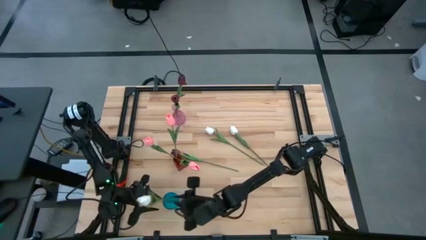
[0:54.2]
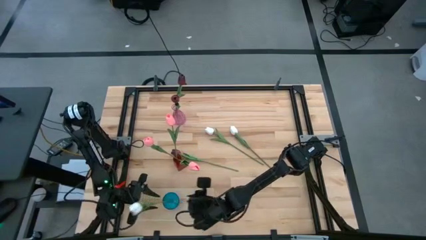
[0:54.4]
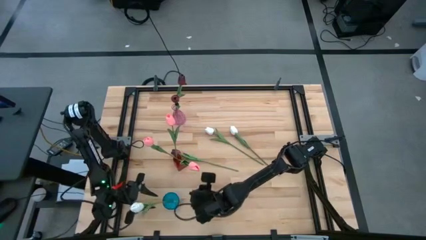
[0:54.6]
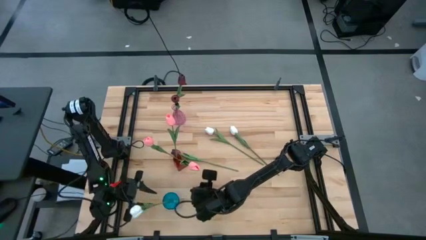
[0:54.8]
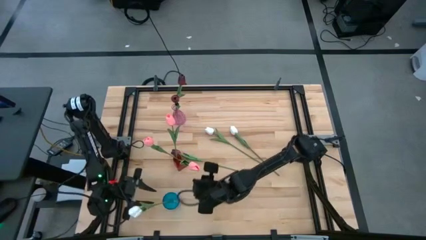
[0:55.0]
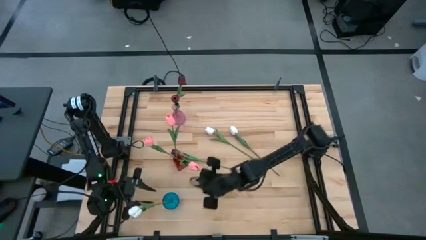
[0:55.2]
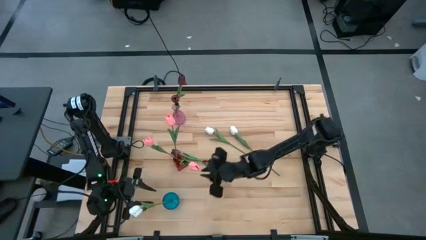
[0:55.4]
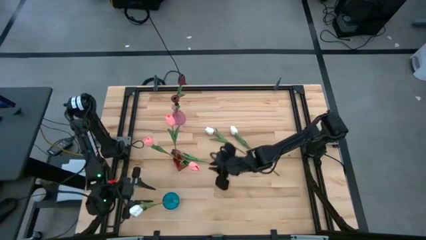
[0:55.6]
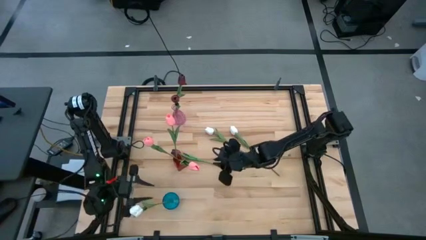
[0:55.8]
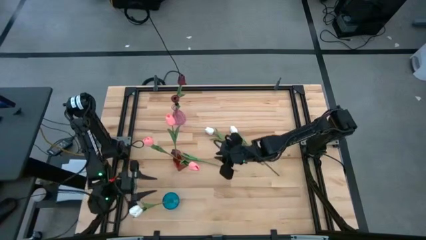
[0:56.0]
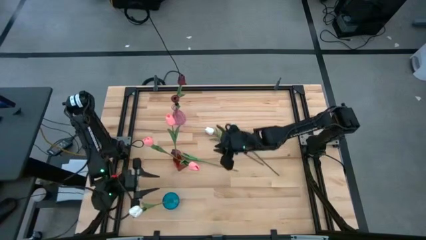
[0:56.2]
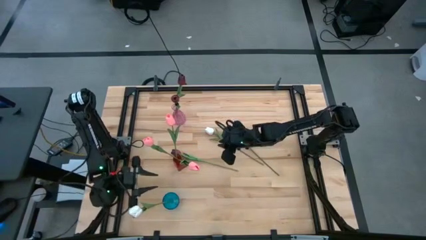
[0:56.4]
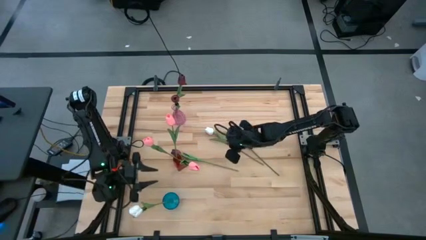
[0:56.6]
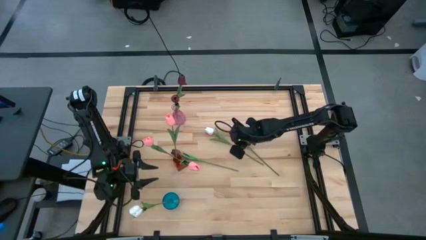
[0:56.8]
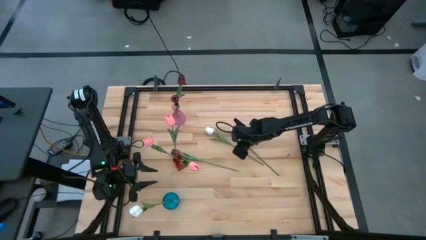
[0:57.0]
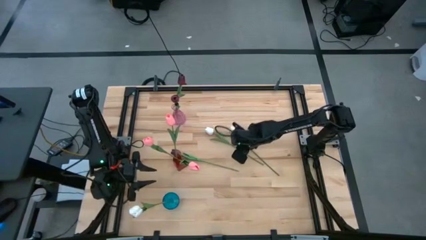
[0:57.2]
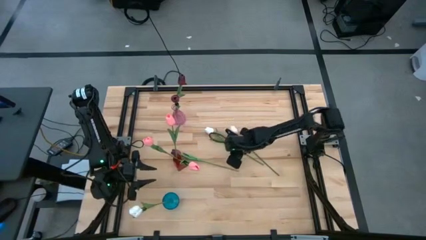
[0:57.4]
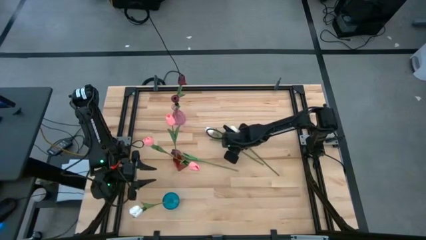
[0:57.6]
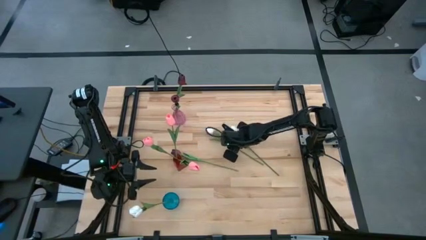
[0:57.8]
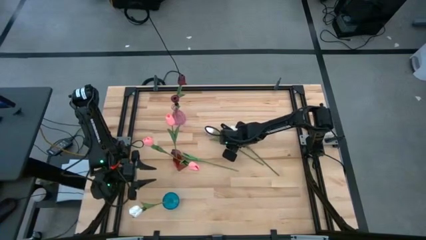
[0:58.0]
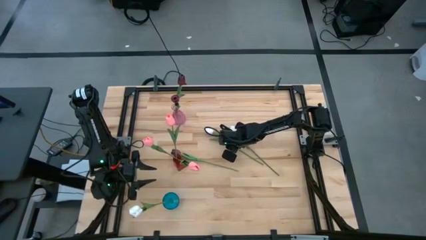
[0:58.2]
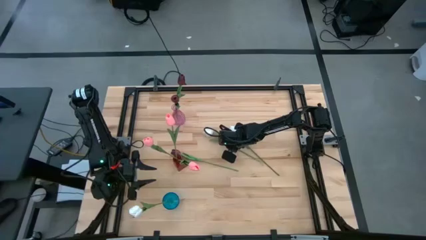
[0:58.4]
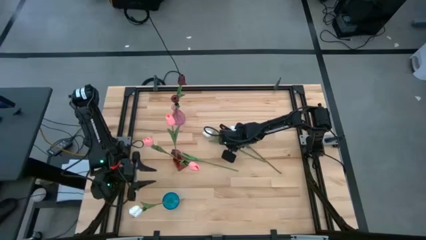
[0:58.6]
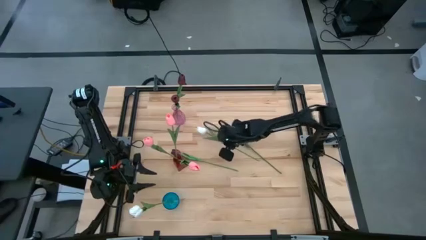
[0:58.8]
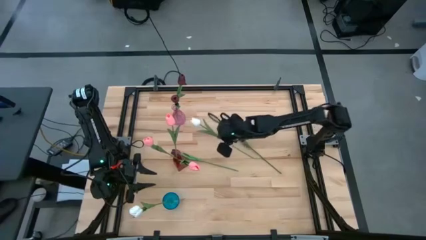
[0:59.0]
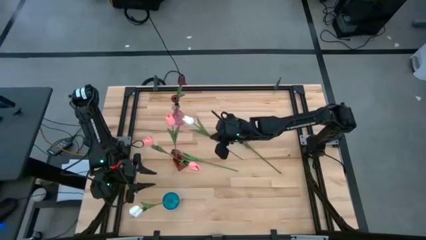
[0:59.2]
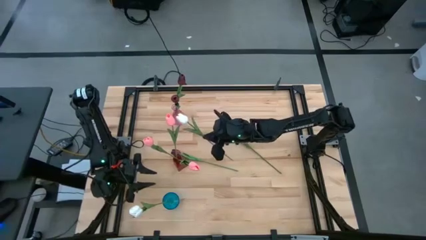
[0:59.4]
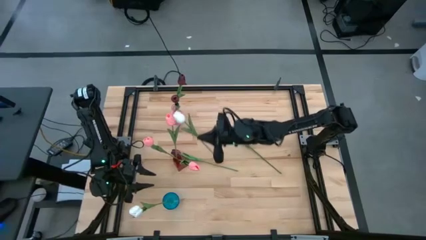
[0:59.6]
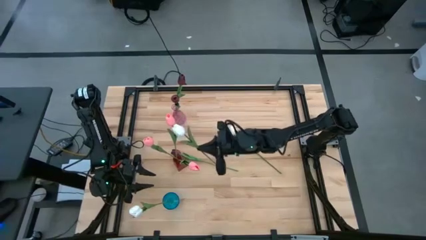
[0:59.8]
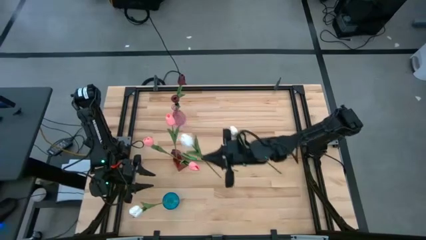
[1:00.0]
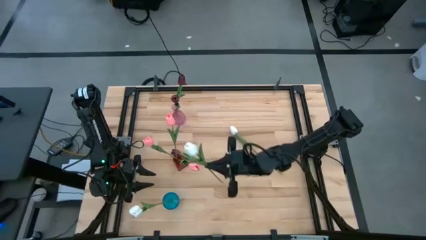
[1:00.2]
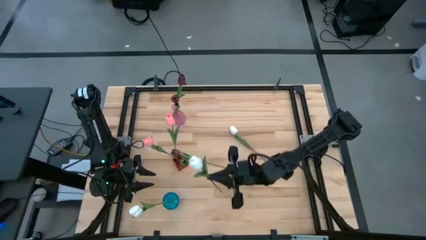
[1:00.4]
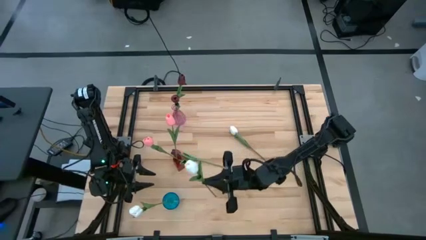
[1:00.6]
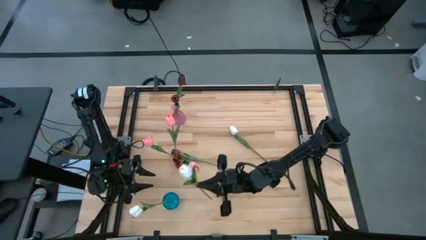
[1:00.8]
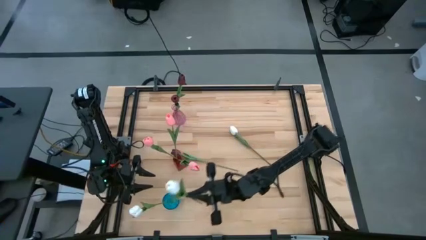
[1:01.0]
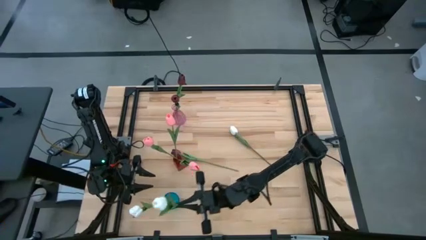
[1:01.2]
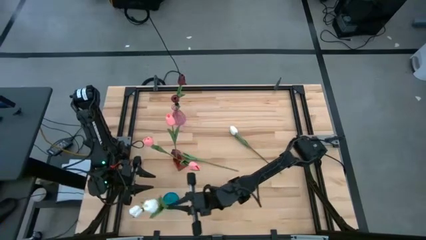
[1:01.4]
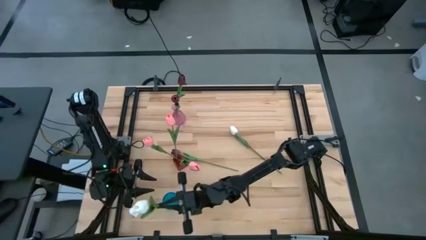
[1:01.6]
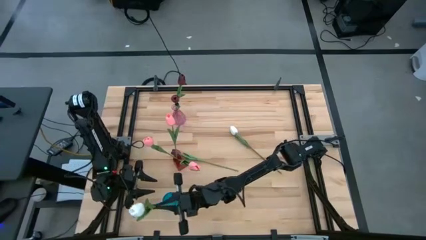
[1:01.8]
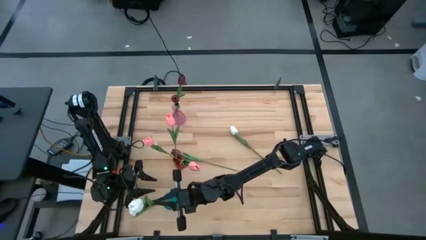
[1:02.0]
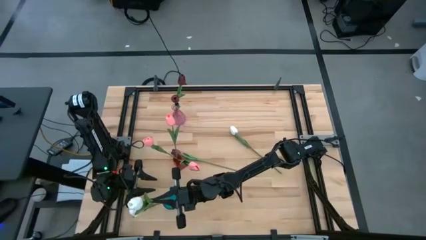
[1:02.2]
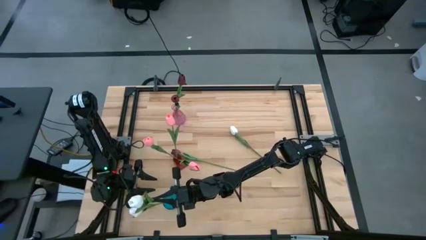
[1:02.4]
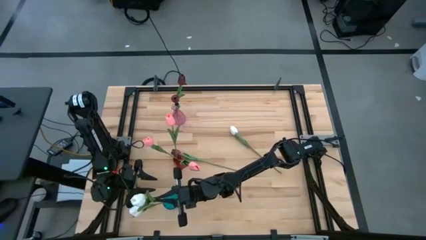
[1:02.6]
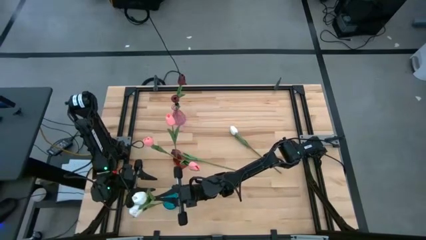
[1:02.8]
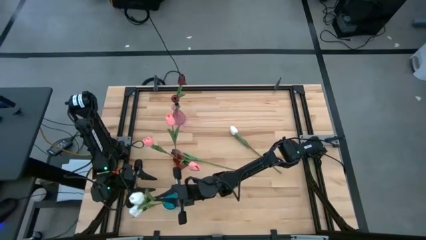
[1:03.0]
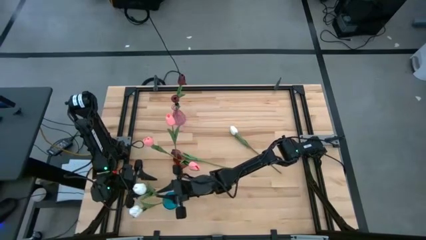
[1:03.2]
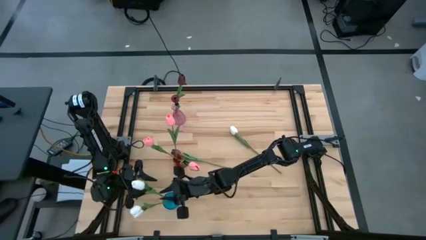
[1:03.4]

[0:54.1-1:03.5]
Task: Sort flowers into vase by color
Put the left white flower into the blue vase

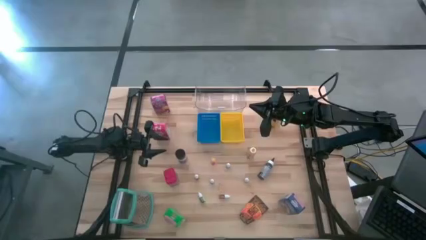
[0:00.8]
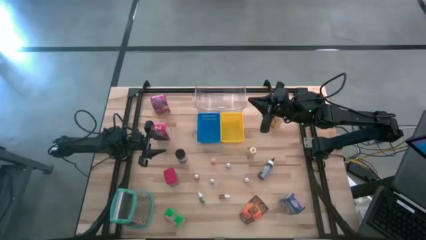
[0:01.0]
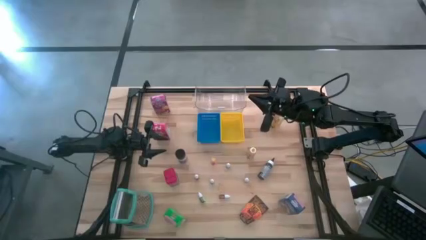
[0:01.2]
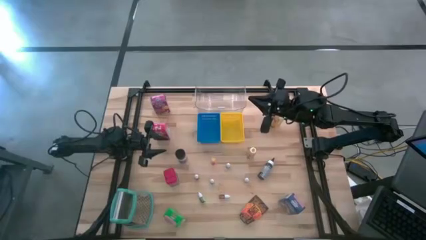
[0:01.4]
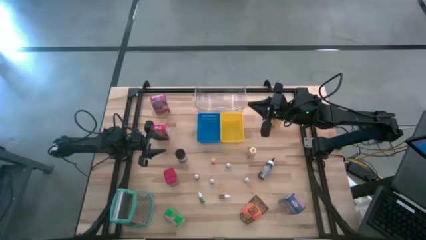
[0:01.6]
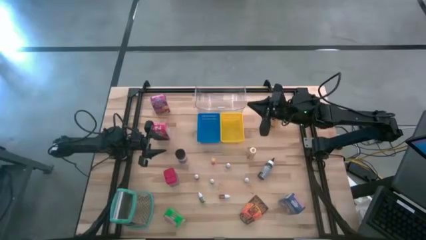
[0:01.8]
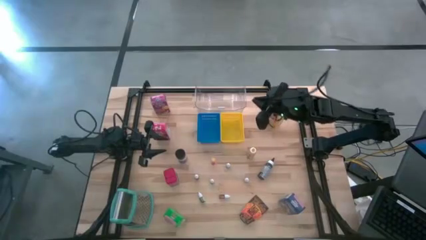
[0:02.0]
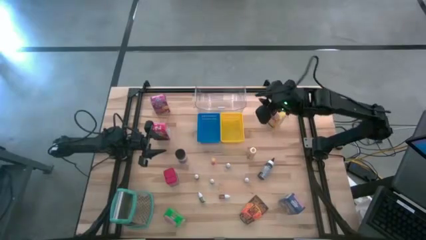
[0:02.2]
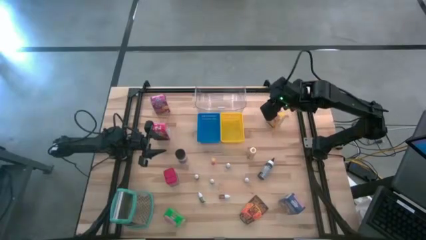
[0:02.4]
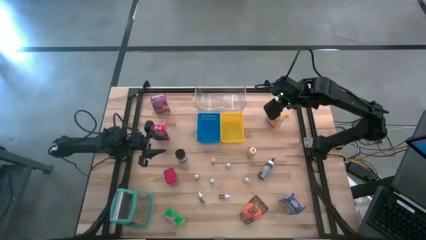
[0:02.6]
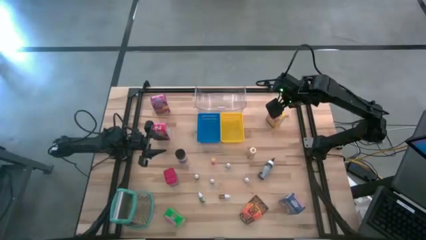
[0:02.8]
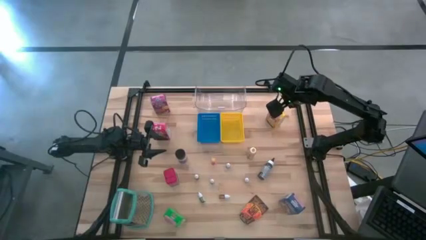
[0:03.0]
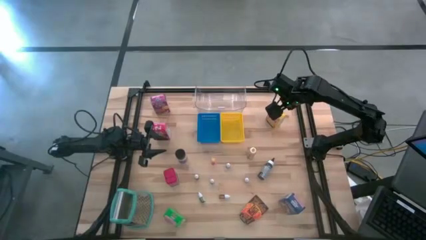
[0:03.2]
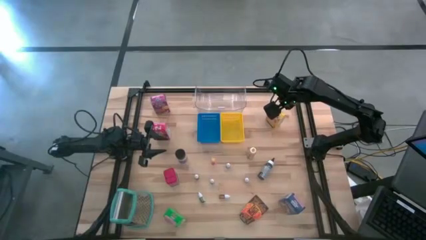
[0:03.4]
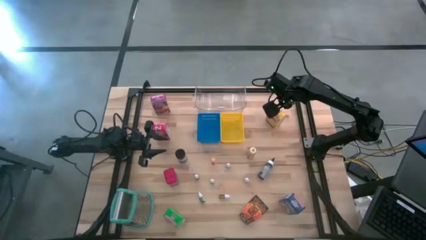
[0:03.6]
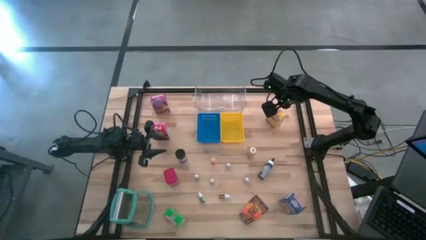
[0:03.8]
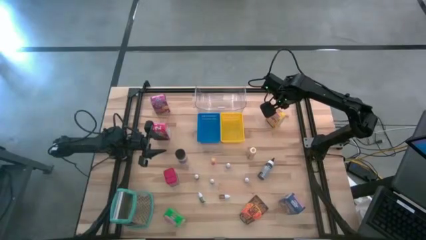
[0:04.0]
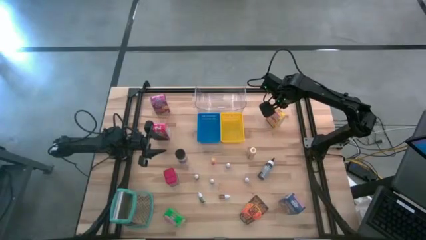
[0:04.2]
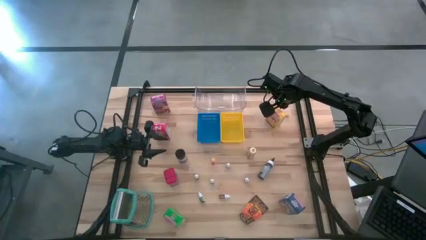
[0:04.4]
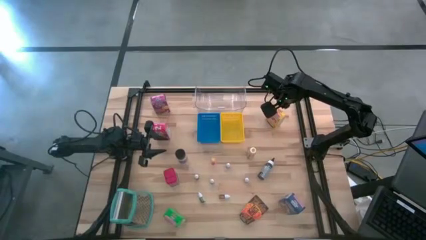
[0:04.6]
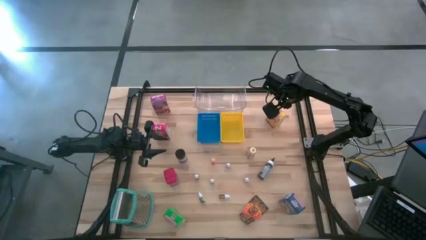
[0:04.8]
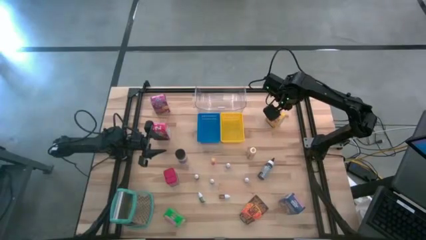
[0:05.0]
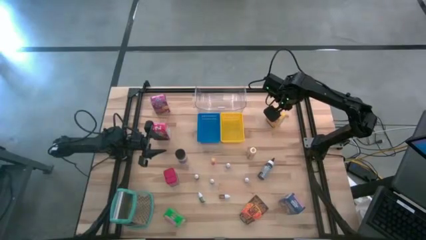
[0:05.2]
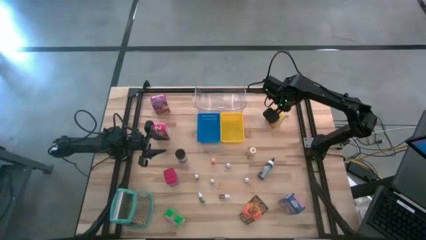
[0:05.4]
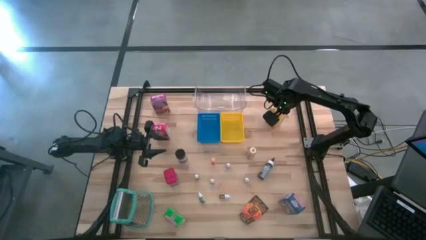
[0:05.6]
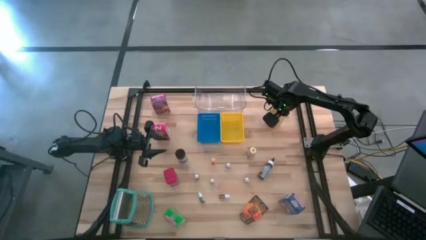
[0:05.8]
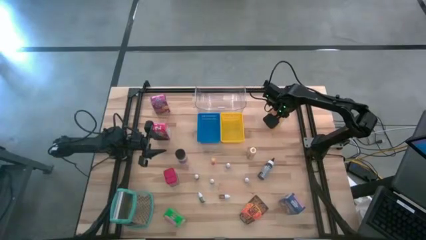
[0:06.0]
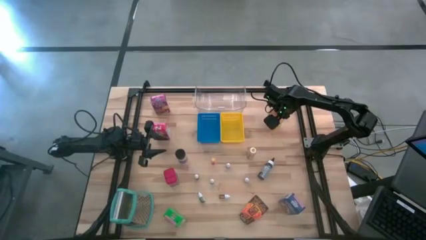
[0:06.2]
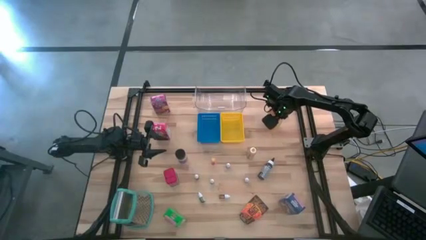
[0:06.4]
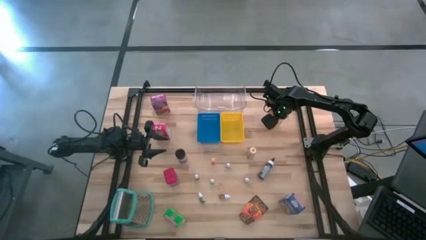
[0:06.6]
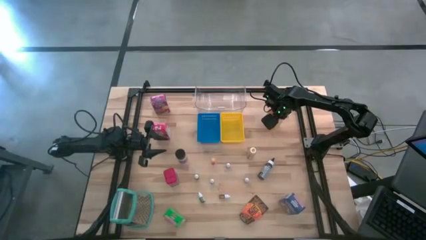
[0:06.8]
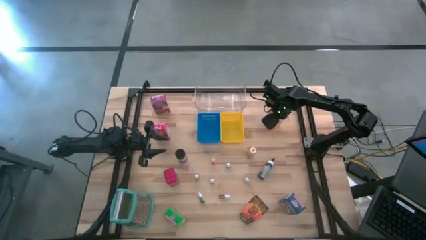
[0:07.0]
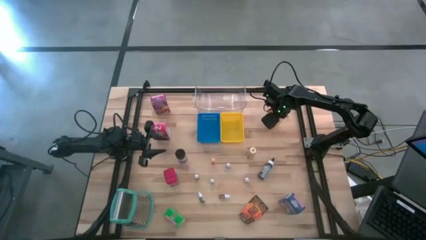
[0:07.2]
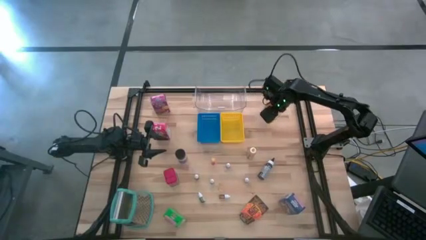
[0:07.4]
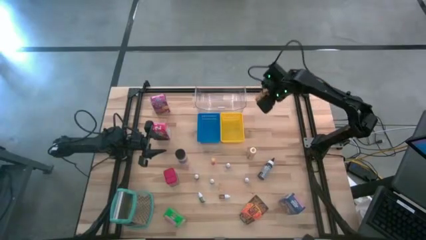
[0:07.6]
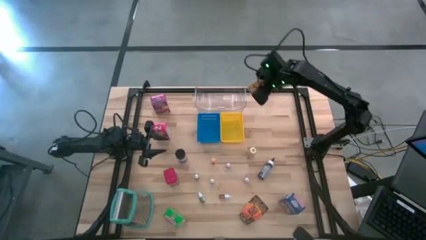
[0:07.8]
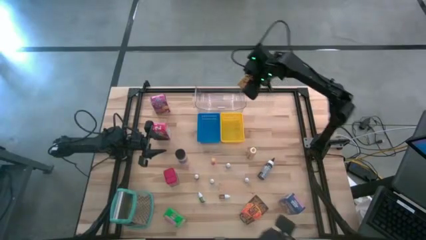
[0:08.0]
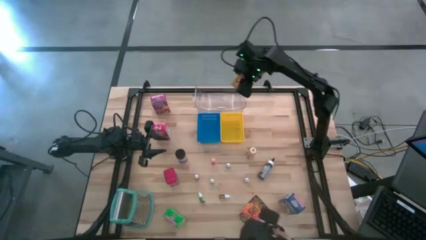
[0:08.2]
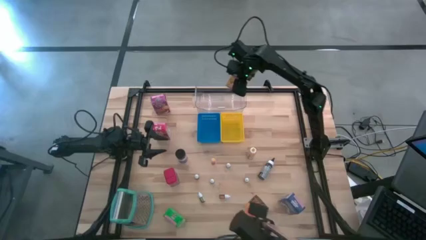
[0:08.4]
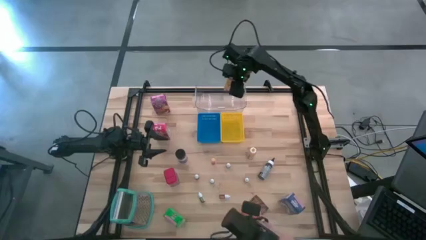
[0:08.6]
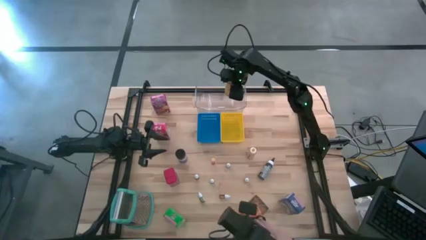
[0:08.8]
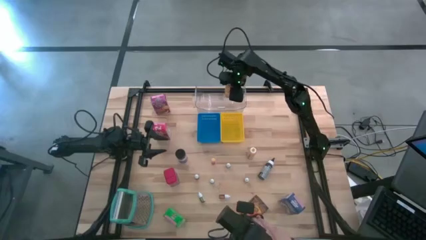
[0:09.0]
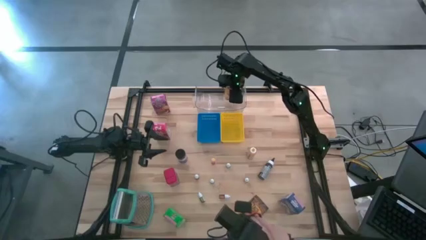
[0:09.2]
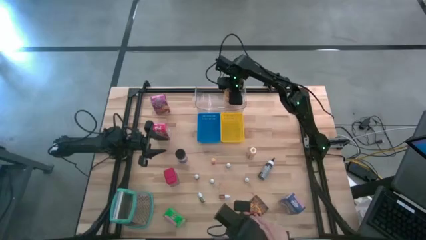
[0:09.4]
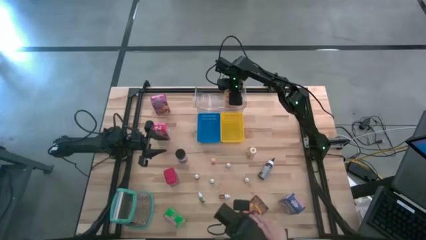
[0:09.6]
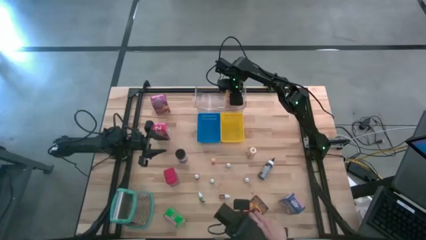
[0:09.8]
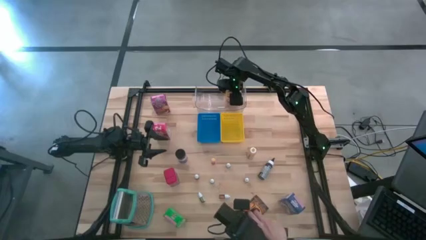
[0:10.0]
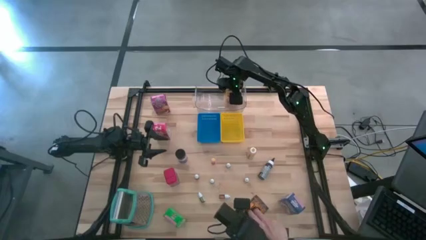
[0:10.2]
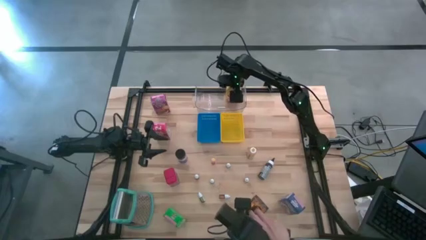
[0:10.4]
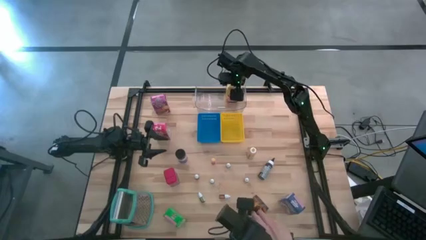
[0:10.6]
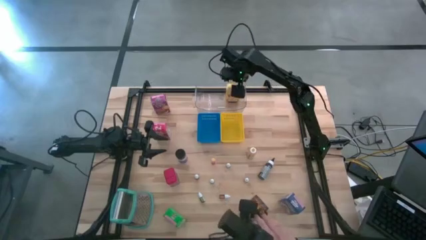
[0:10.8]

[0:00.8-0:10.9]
Task: Pick & Place Kitchen Items
Put the yellow cereal box into the transparent bin
